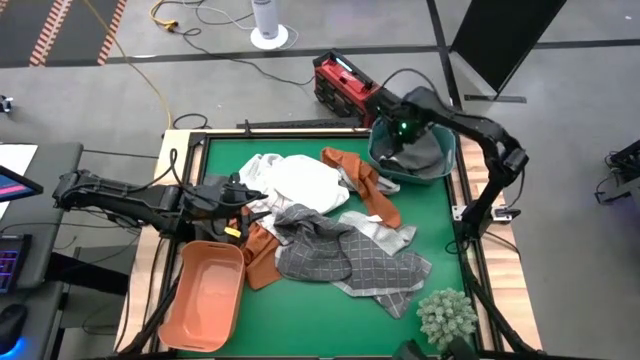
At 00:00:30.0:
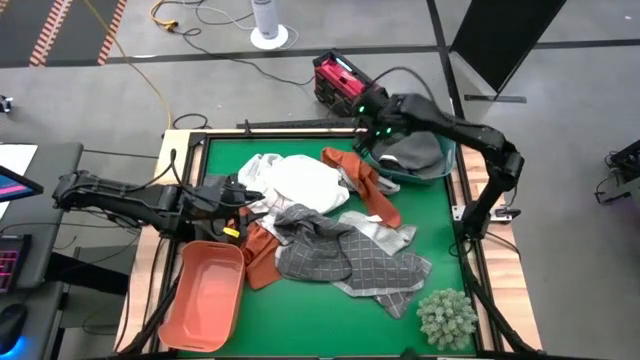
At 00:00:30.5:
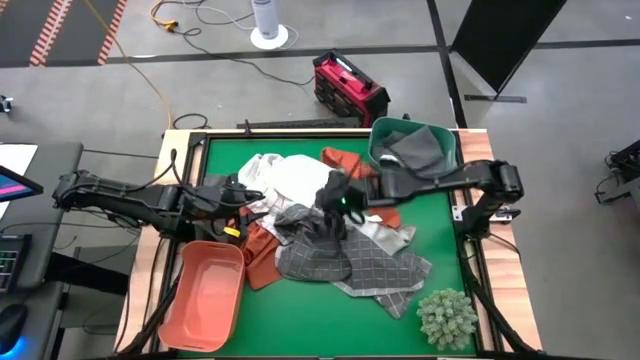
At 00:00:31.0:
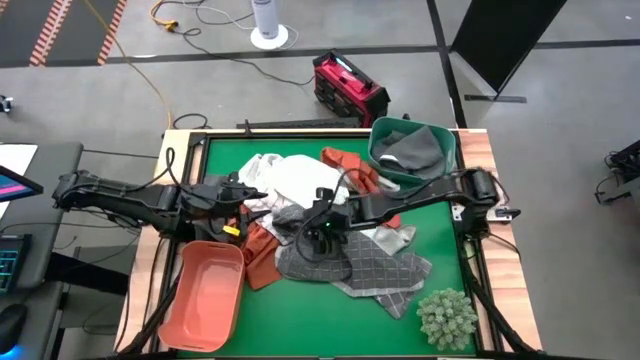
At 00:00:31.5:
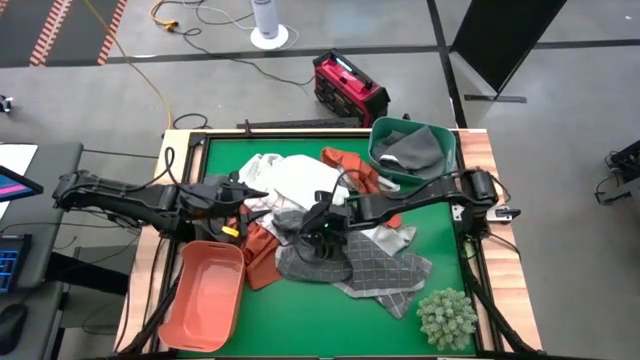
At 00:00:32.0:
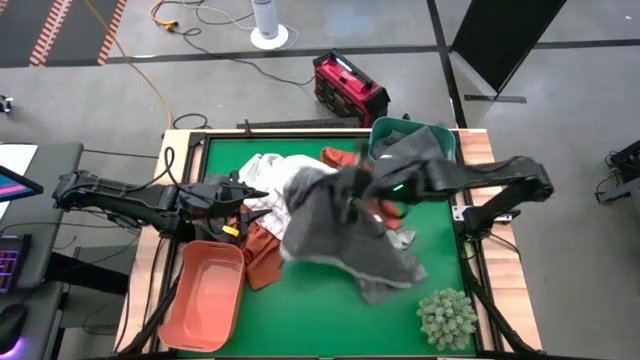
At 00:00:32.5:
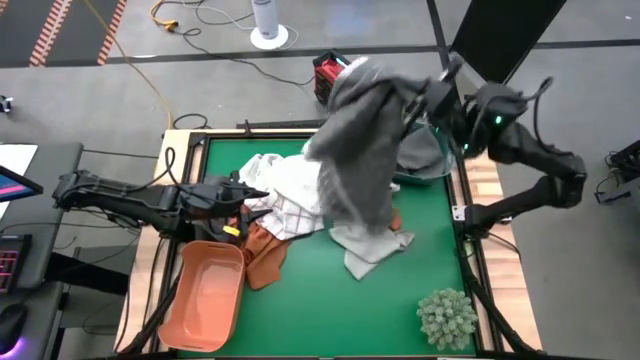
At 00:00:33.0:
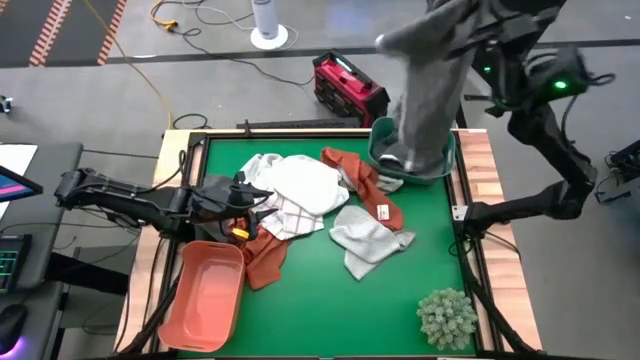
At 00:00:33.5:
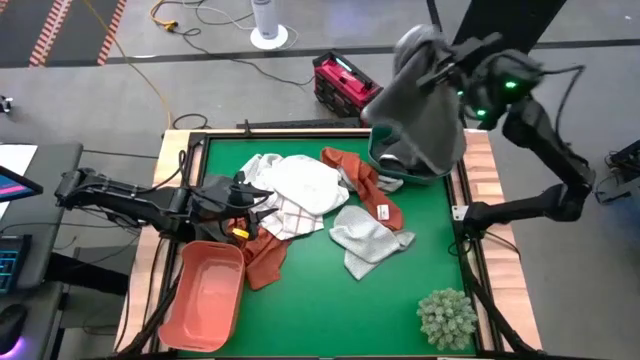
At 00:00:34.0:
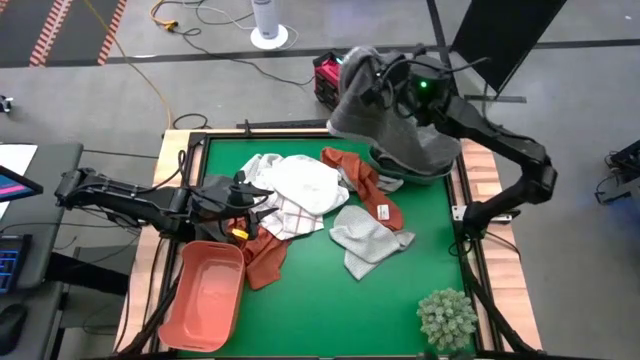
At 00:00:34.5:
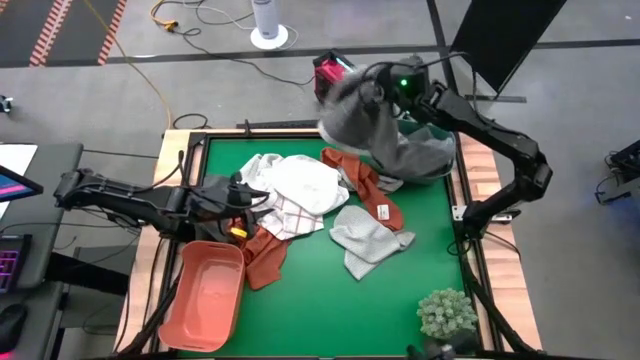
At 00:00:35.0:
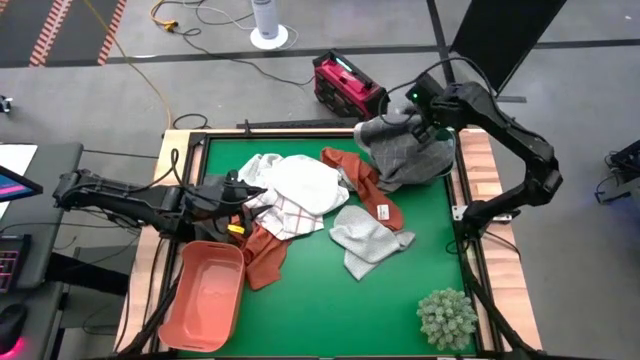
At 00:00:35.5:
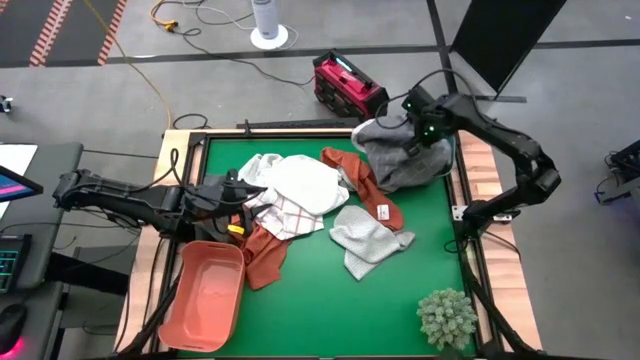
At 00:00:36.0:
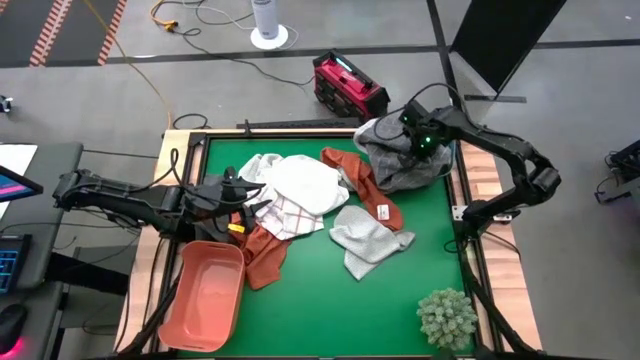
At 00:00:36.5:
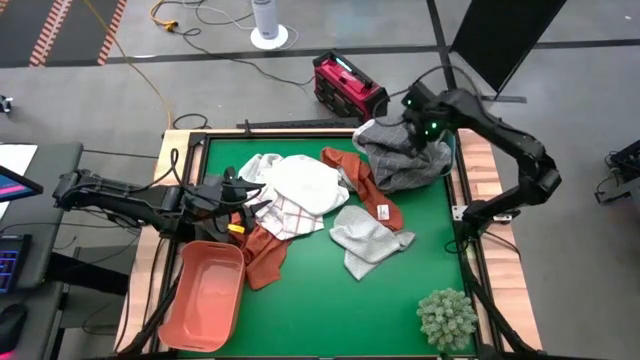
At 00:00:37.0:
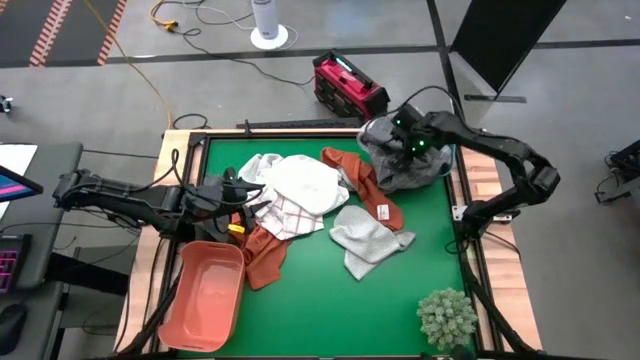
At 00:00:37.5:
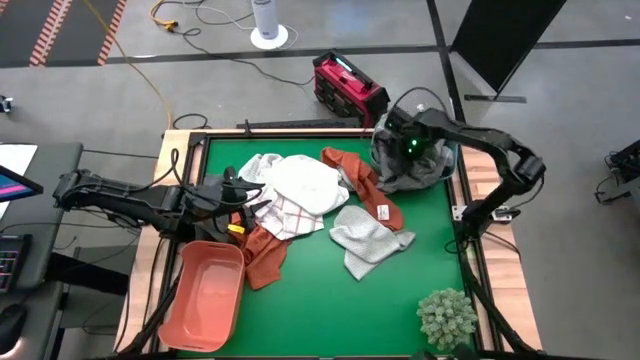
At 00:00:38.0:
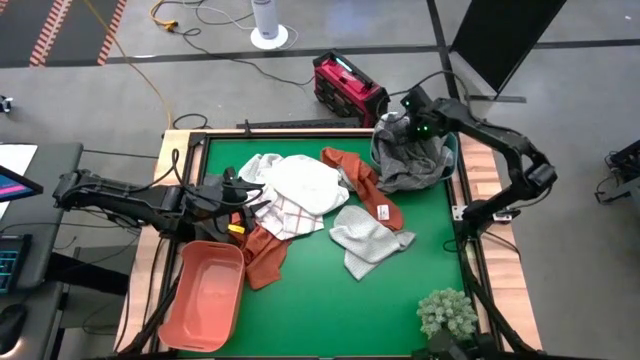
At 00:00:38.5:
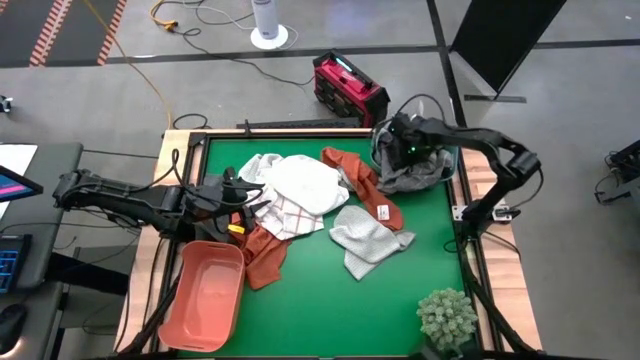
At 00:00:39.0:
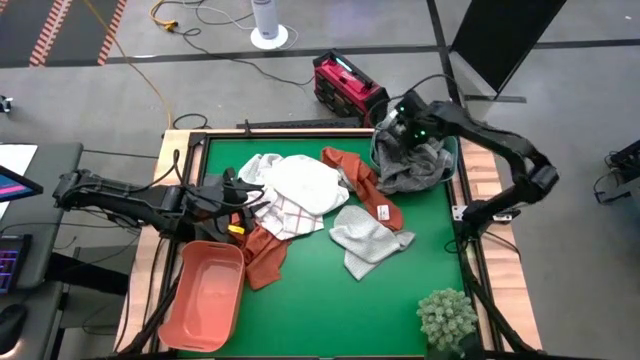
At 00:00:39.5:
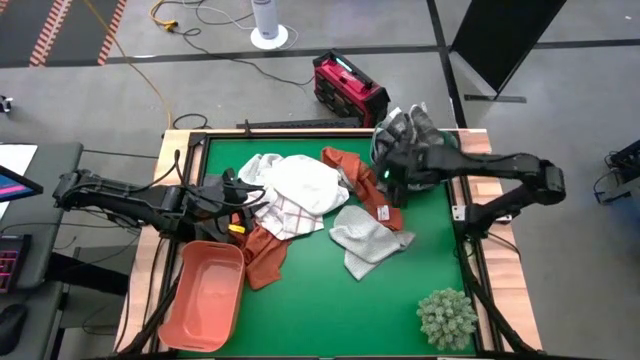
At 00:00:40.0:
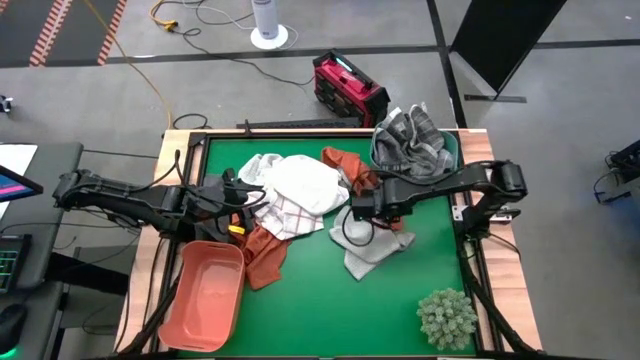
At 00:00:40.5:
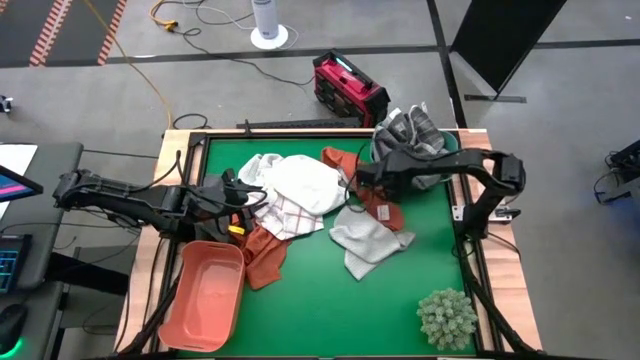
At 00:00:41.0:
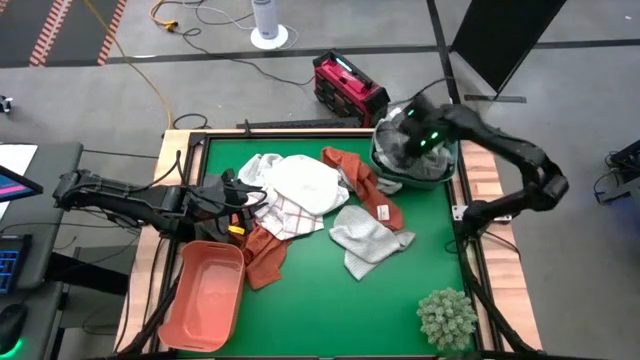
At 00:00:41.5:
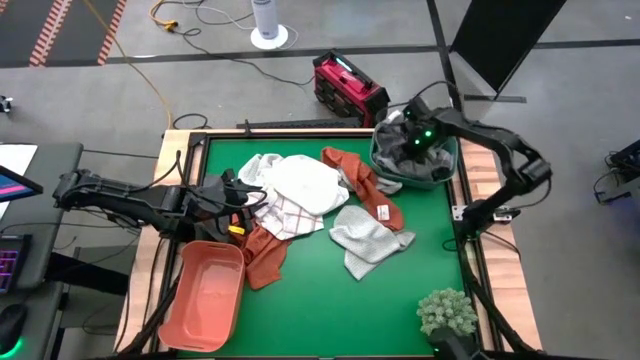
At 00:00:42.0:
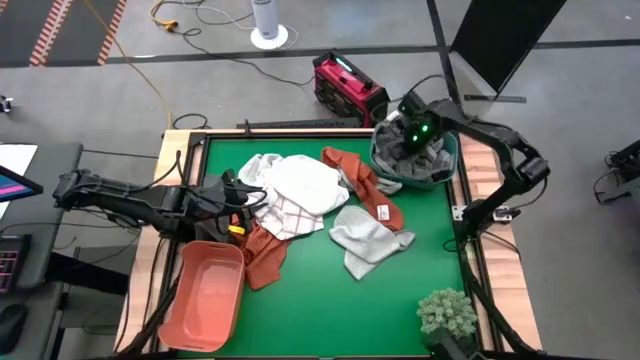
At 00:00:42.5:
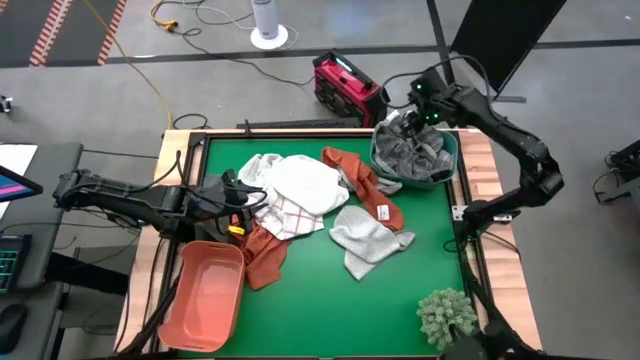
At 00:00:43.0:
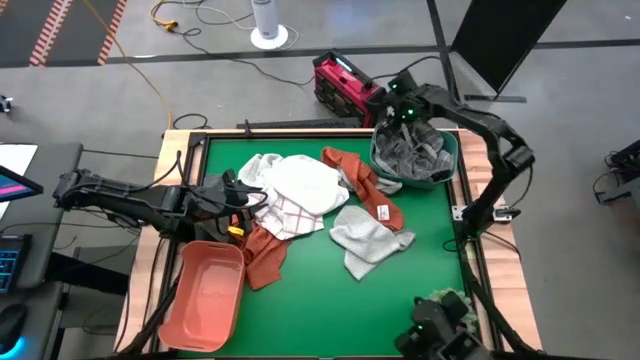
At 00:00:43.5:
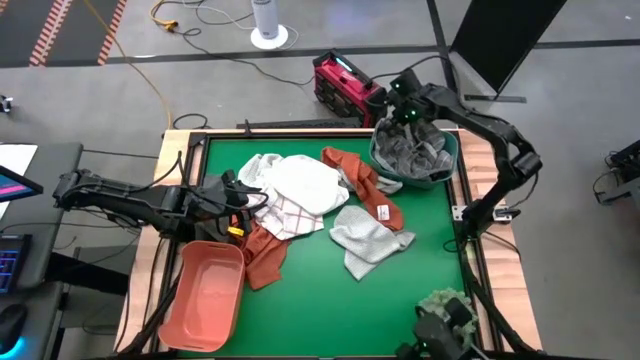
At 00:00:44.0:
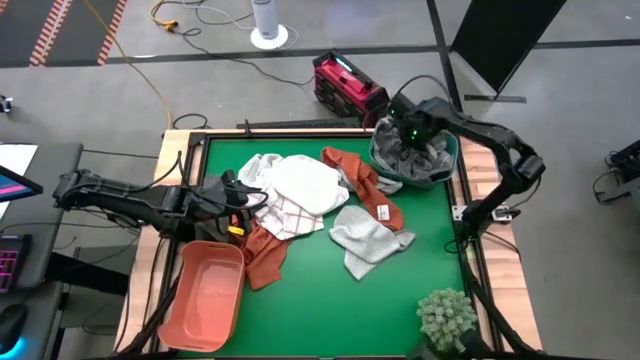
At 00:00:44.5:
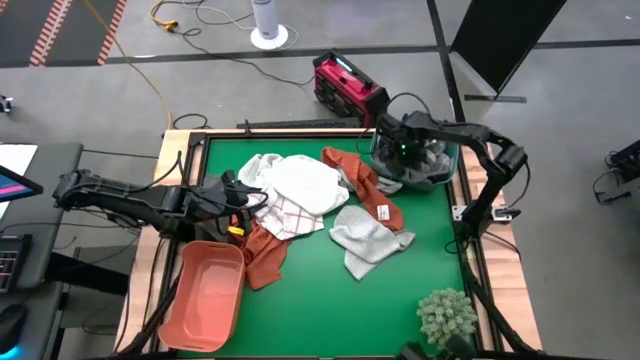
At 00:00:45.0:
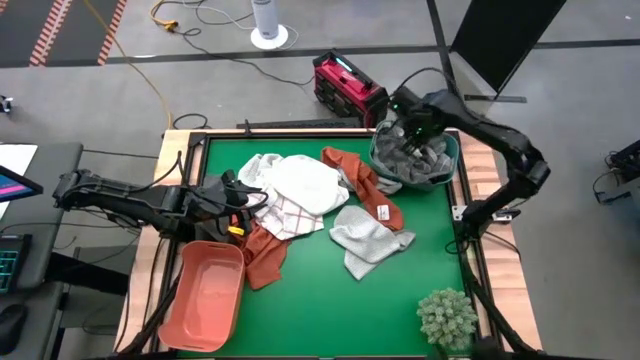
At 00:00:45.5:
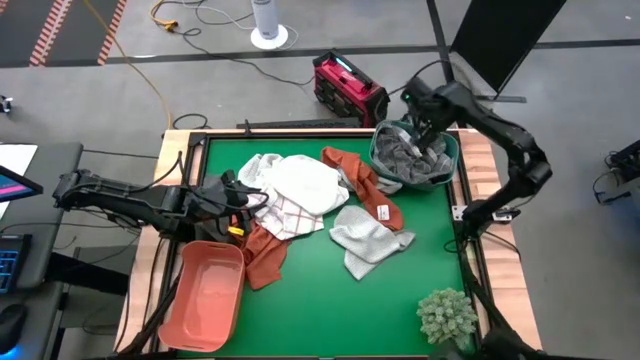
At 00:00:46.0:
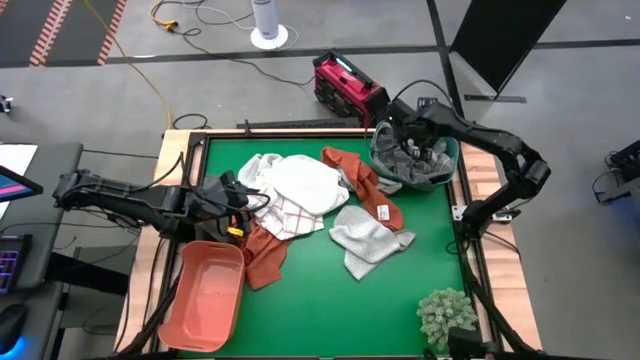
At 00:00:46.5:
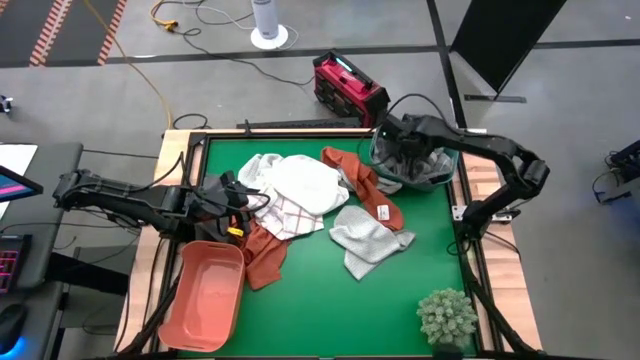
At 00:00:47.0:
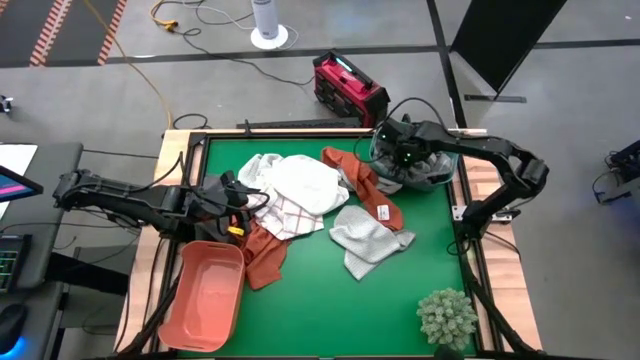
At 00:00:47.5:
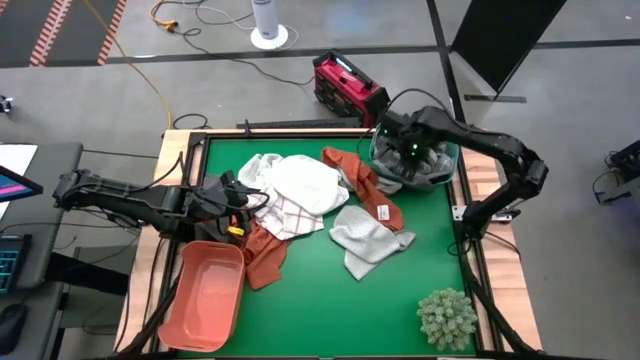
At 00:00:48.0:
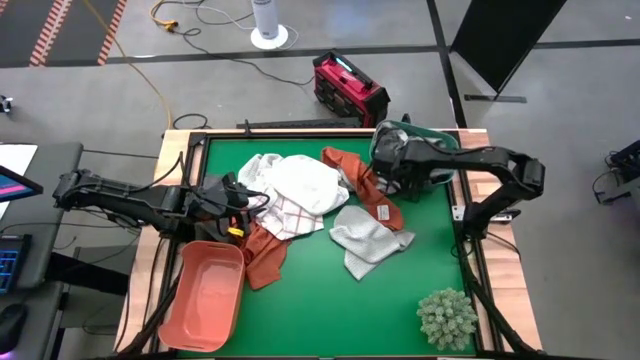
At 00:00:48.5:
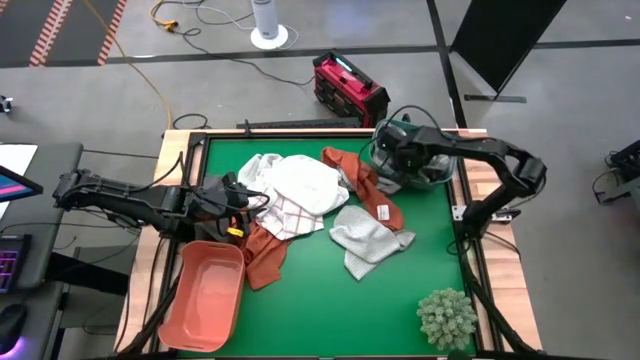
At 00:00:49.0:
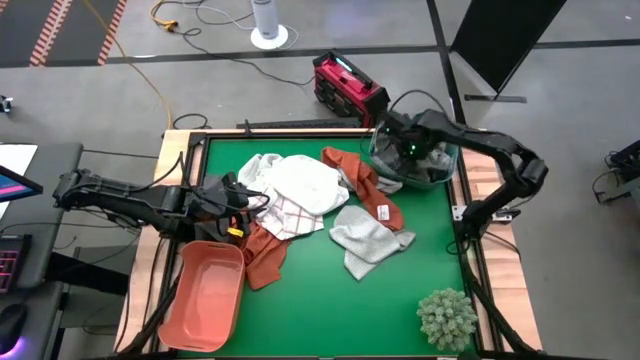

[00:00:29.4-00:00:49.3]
Task: Sort towels by color in basket
Put the gray patterned towel into the green bin
